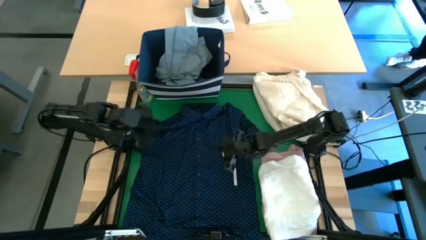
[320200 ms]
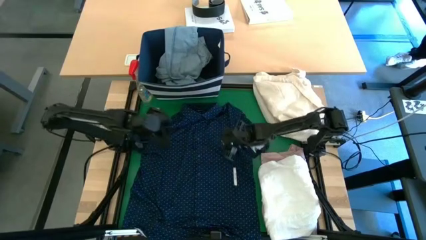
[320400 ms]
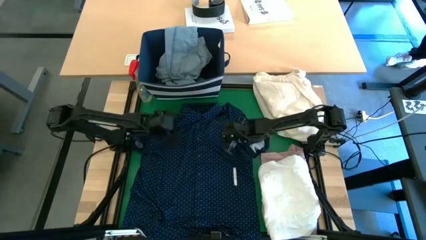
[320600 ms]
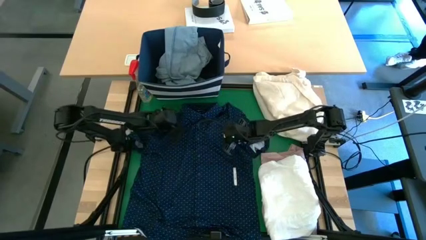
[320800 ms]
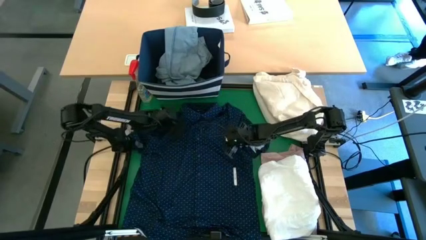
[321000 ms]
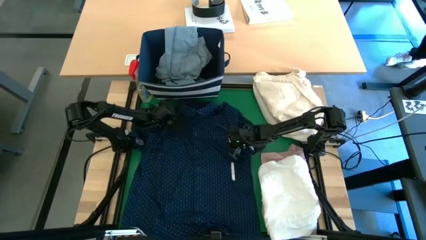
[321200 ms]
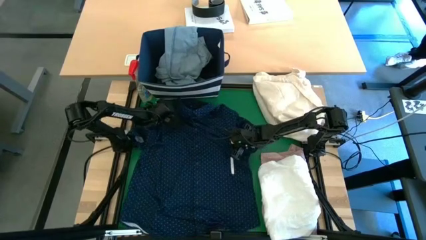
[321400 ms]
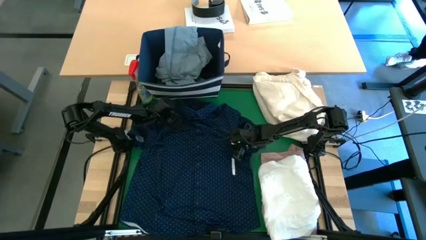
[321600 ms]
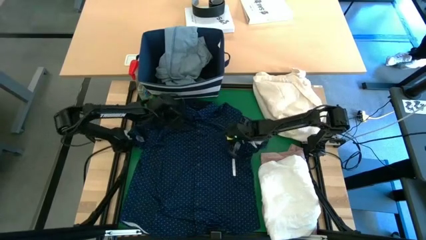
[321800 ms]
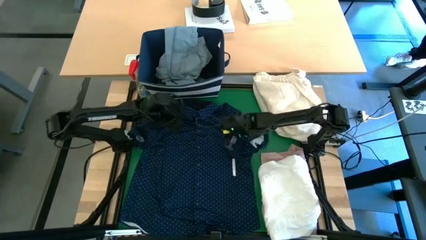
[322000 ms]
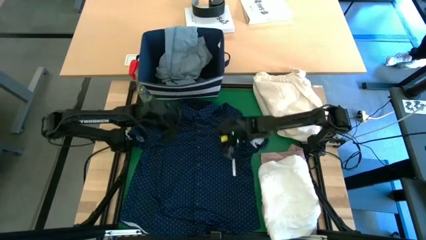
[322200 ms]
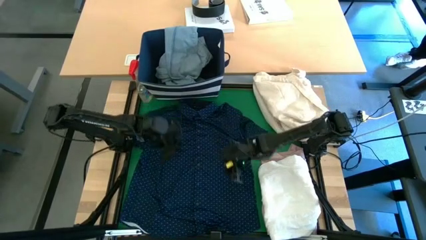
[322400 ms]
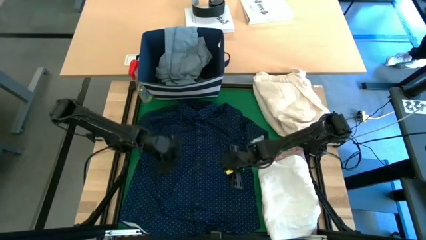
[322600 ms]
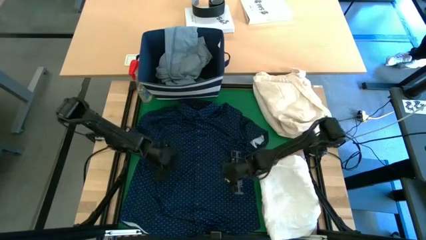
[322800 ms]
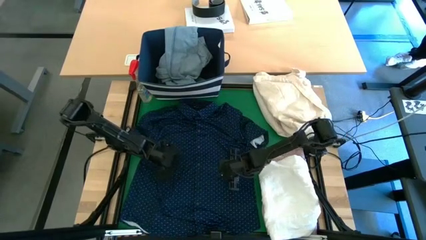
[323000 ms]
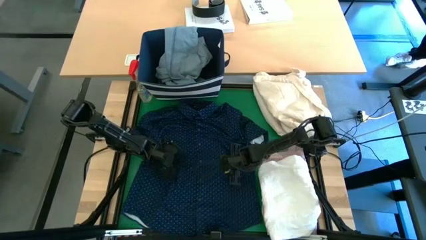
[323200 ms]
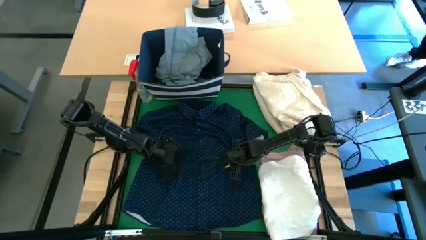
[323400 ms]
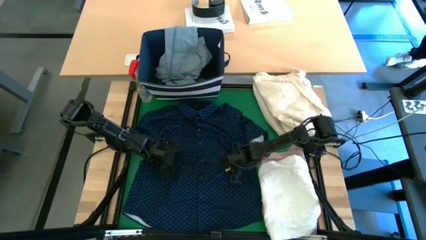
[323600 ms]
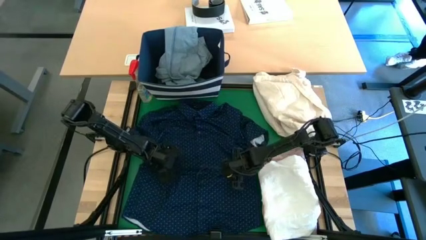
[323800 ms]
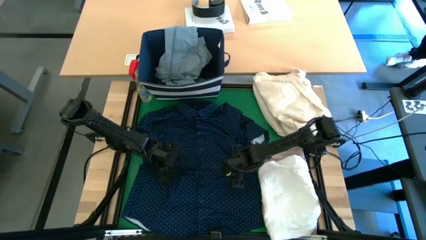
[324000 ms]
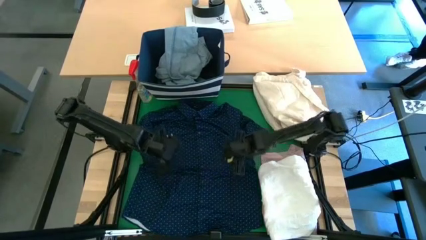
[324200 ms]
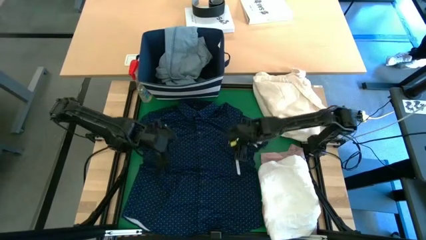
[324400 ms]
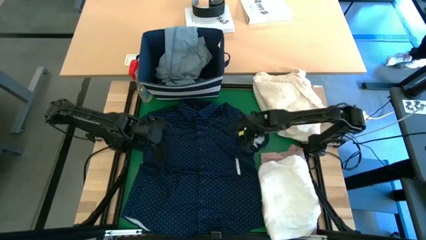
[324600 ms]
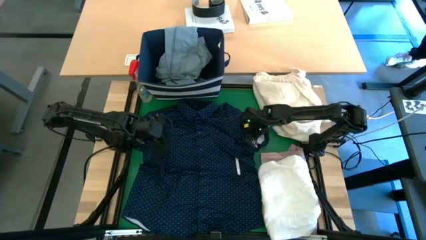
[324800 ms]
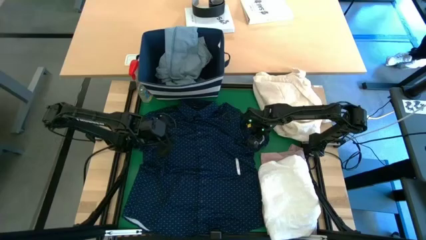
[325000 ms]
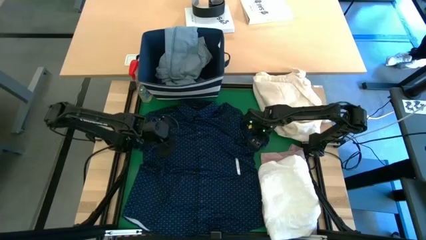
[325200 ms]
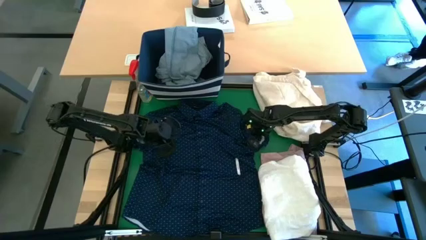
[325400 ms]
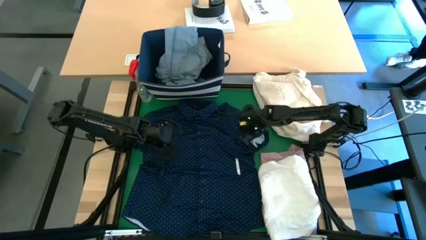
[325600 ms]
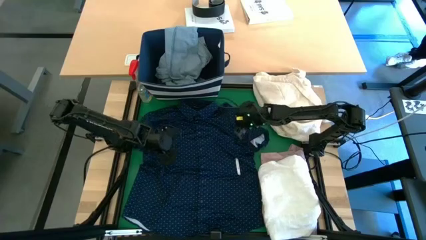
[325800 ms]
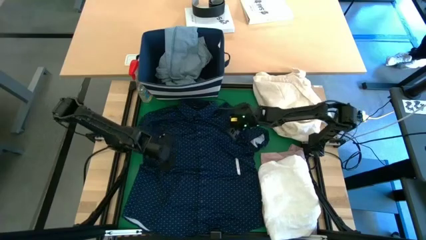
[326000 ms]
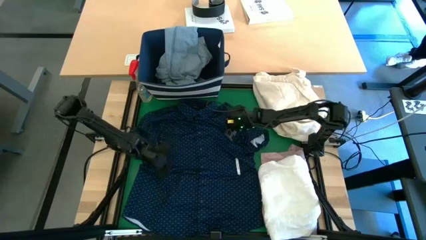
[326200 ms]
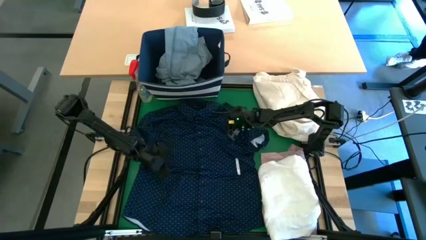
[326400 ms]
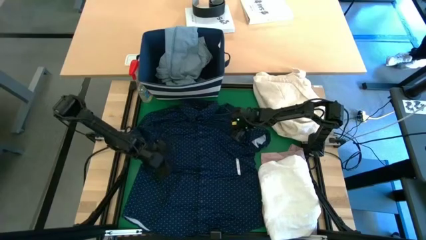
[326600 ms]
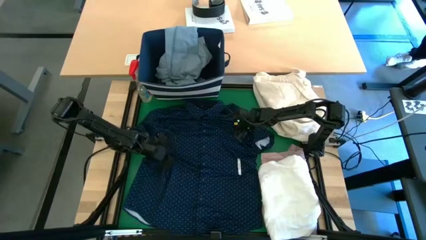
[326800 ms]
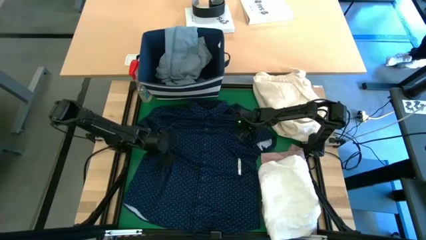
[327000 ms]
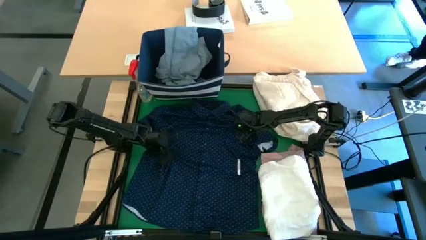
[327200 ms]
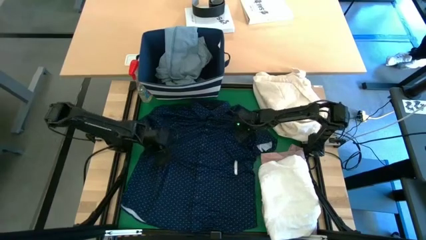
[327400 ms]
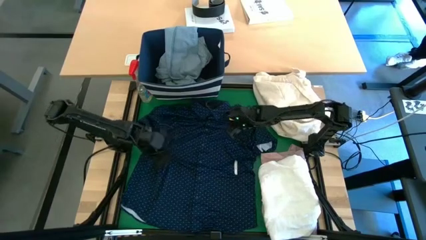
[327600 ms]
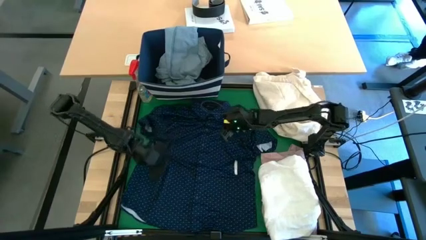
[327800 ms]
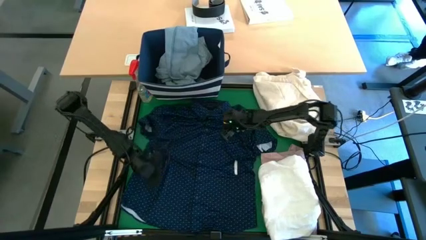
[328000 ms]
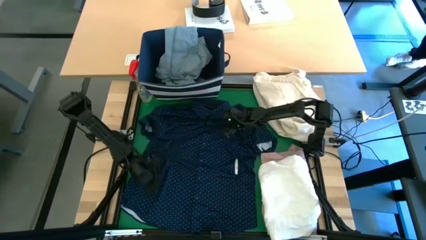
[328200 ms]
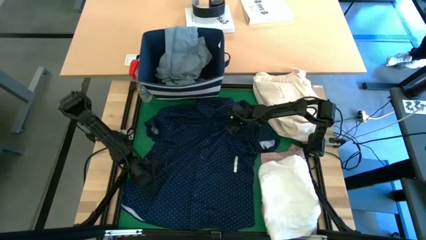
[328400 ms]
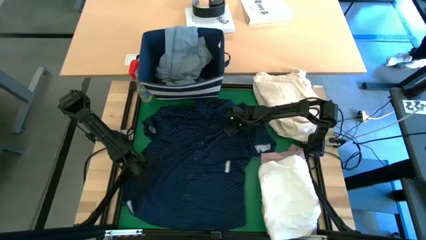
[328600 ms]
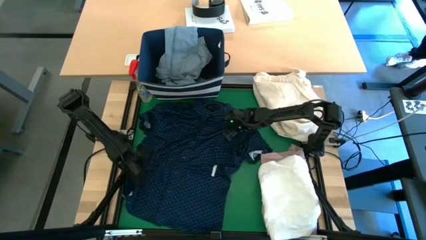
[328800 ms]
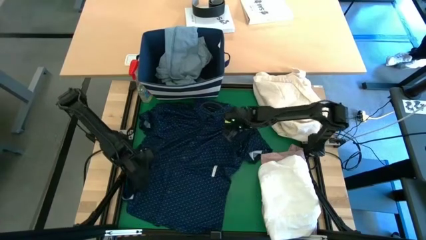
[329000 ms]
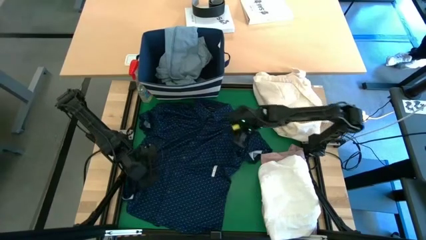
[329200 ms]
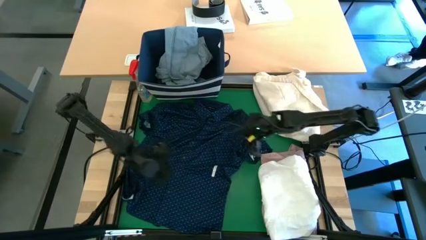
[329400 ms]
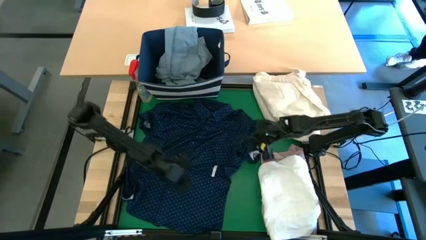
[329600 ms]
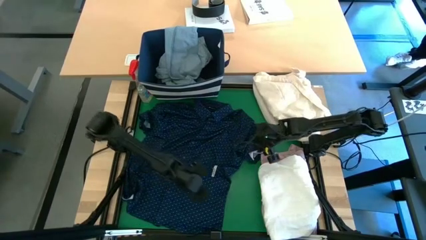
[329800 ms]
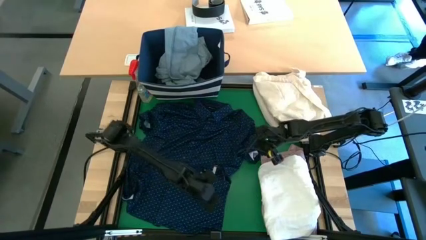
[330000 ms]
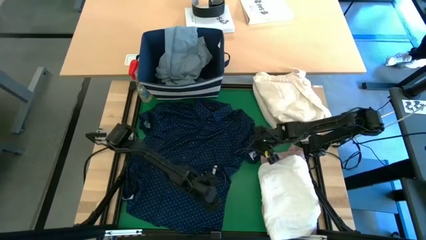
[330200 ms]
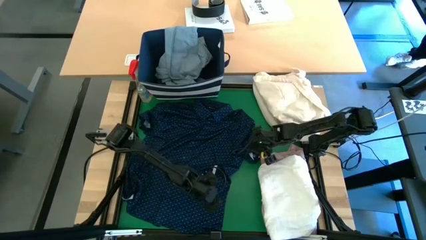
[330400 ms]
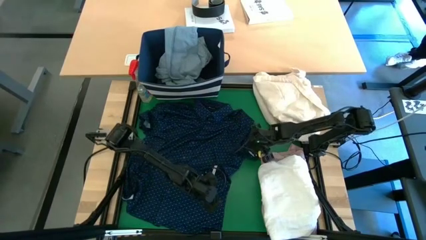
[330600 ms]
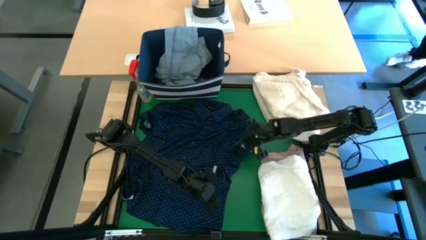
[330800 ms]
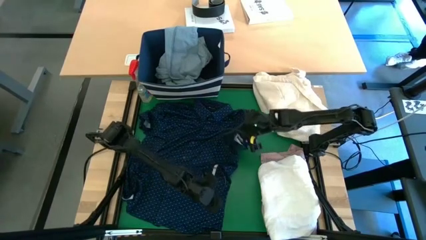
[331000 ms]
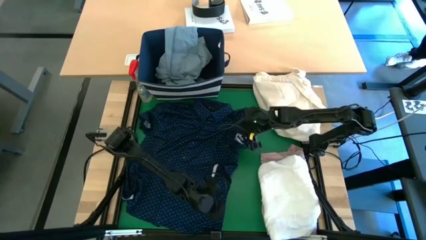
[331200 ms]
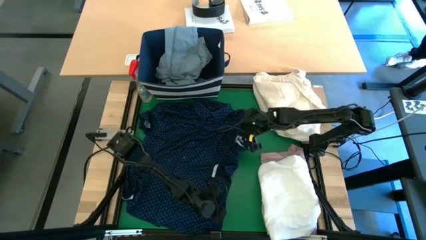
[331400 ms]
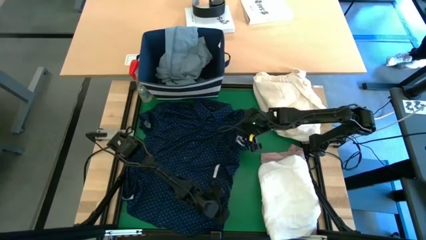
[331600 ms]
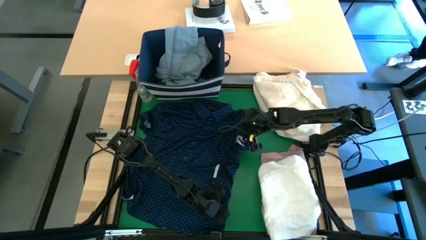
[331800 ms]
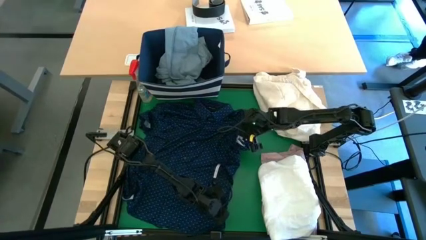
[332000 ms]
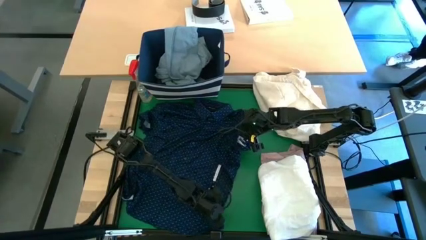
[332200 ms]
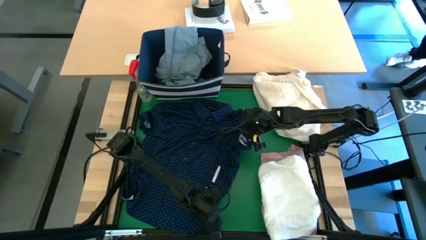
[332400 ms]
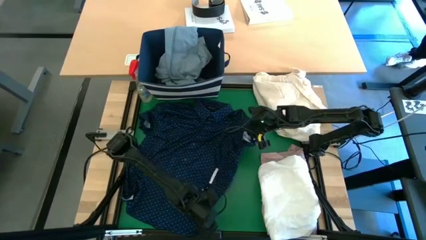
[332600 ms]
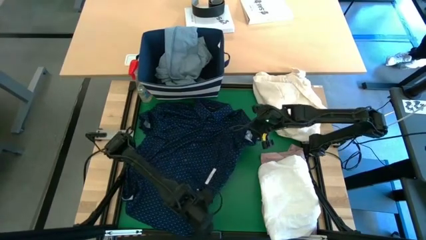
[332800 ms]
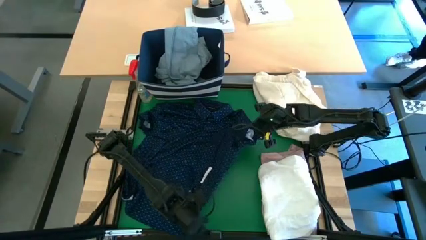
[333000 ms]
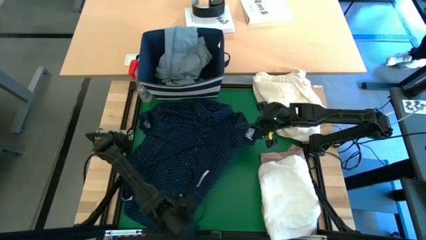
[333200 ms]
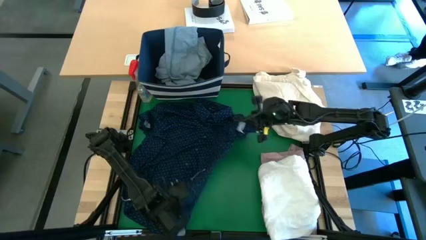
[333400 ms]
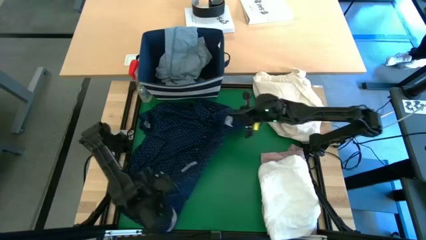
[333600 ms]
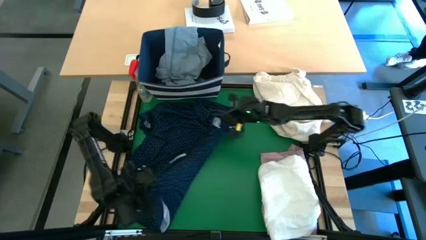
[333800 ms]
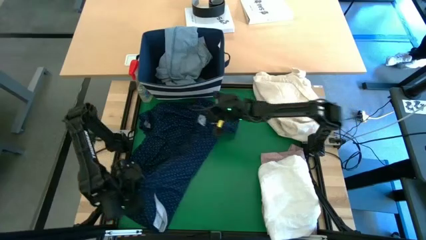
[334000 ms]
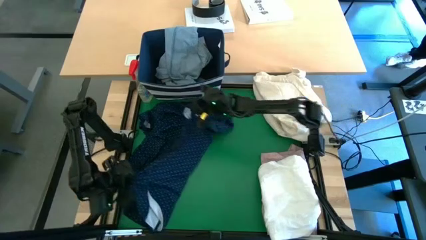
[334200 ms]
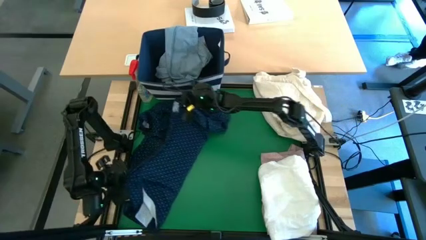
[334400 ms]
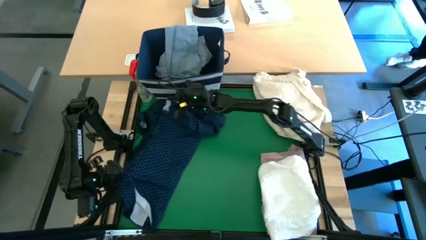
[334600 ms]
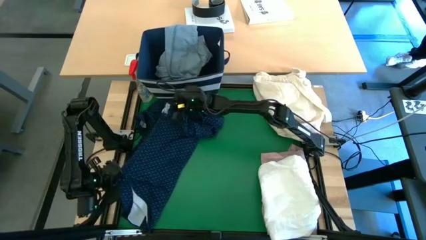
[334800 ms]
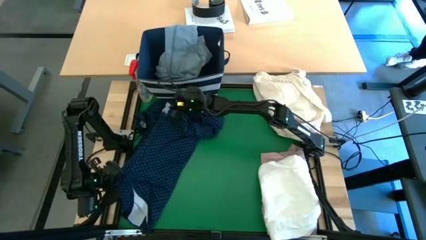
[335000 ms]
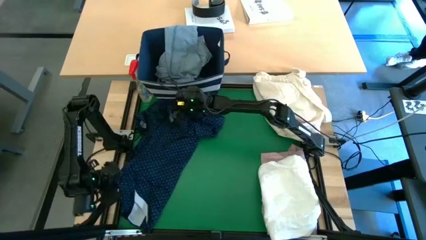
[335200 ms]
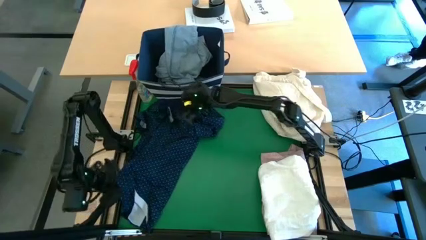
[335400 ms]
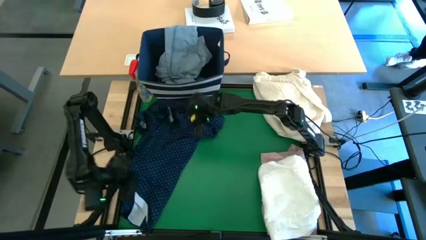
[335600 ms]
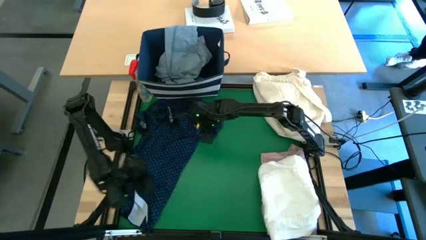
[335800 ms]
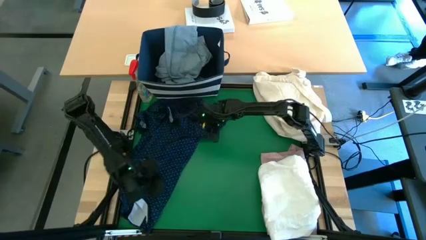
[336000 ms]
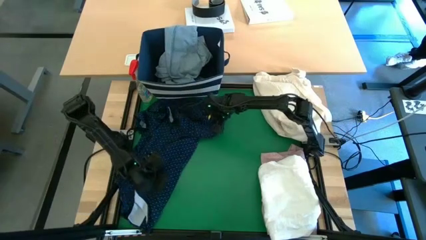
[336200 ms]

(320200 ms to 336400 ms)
Task: Fold laundry
Fold the blue polo shirt
